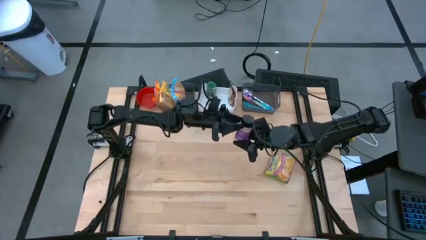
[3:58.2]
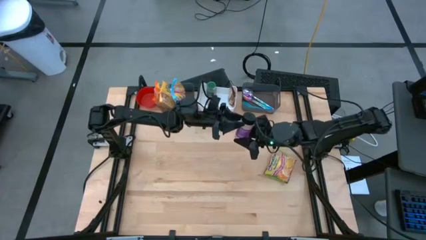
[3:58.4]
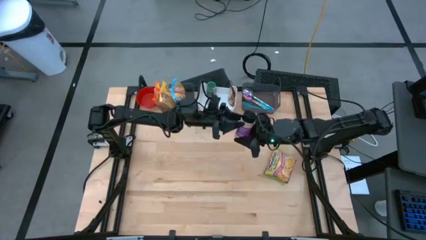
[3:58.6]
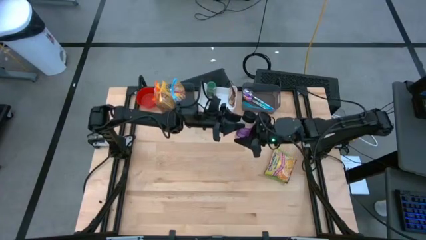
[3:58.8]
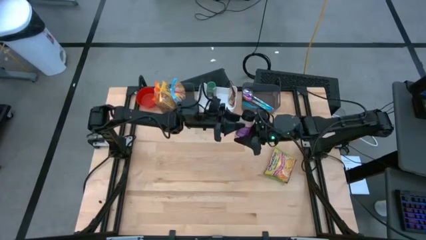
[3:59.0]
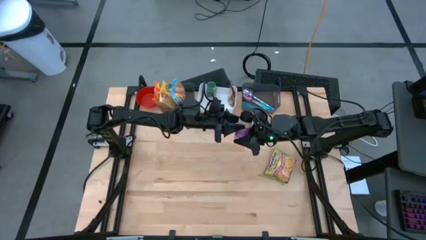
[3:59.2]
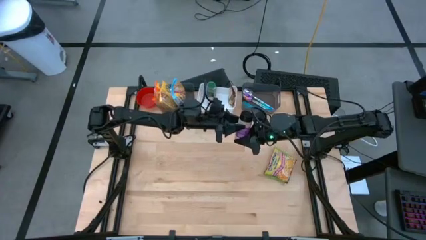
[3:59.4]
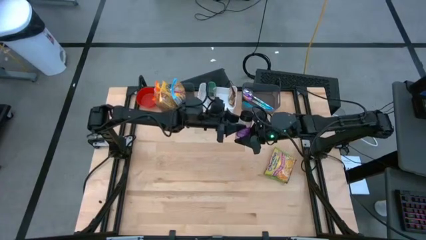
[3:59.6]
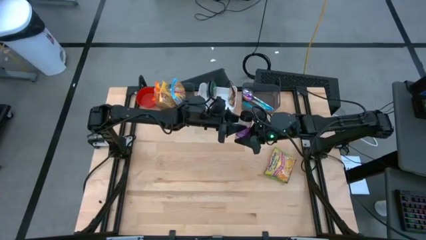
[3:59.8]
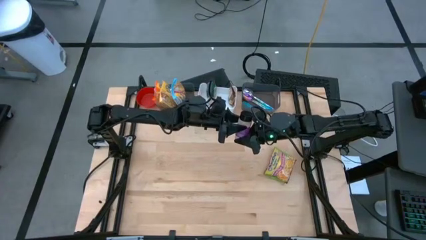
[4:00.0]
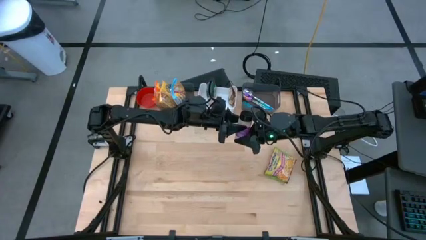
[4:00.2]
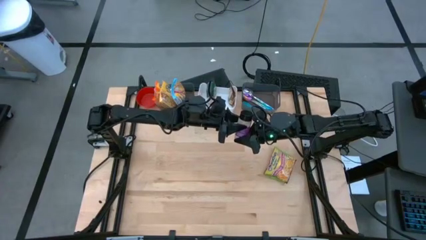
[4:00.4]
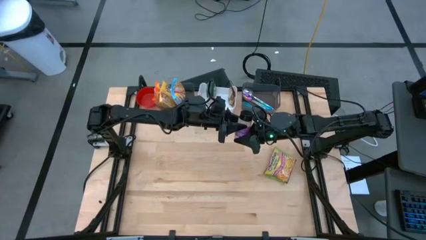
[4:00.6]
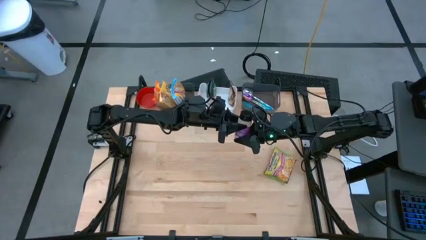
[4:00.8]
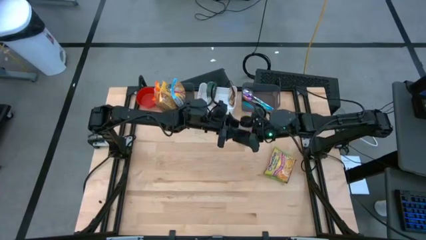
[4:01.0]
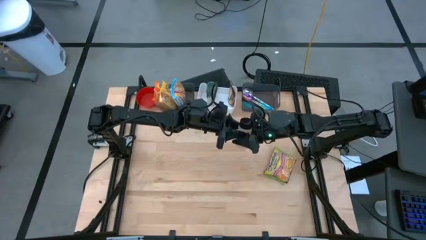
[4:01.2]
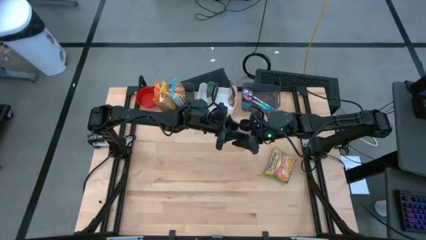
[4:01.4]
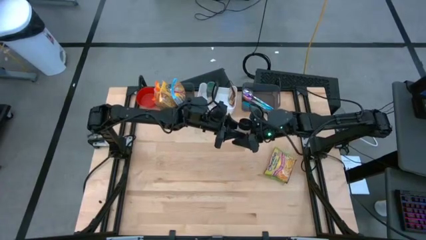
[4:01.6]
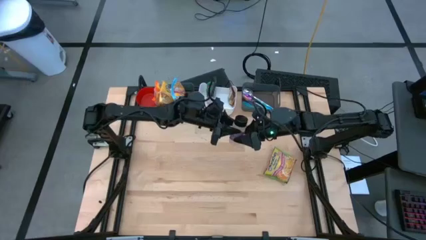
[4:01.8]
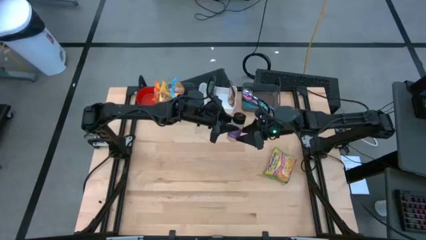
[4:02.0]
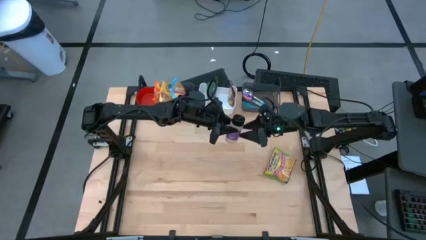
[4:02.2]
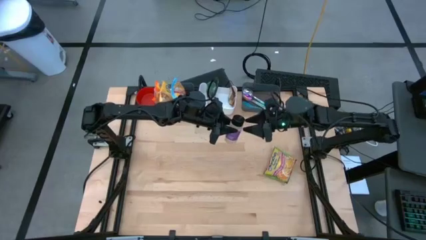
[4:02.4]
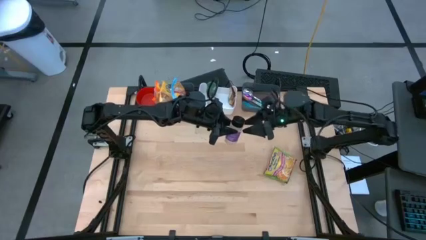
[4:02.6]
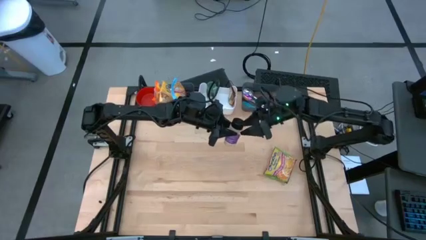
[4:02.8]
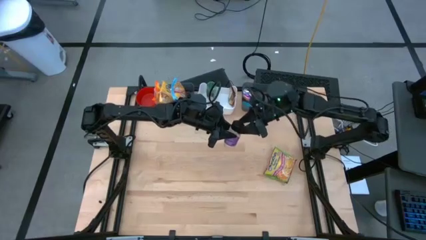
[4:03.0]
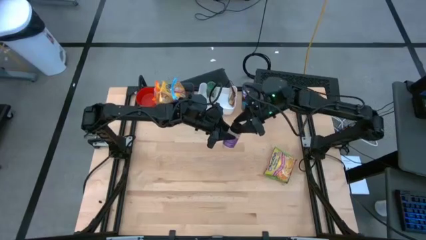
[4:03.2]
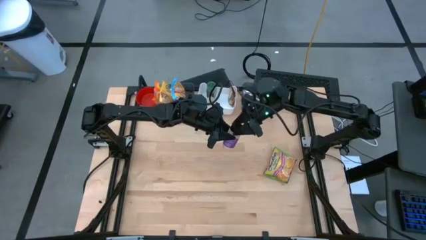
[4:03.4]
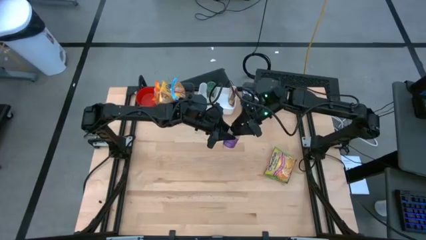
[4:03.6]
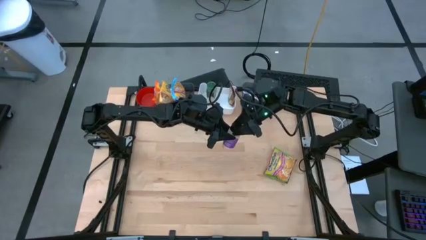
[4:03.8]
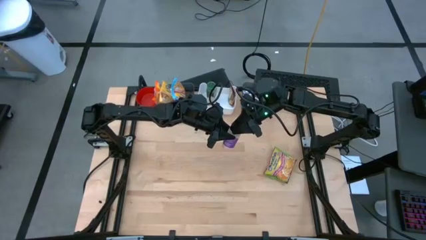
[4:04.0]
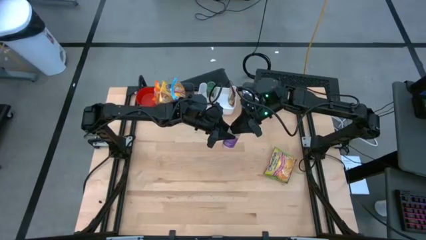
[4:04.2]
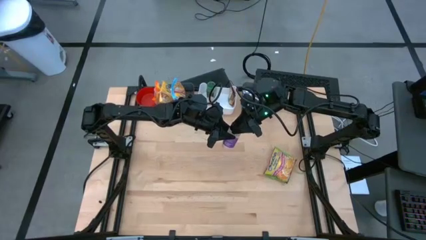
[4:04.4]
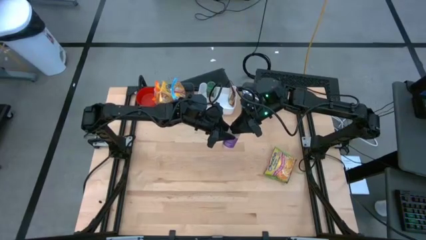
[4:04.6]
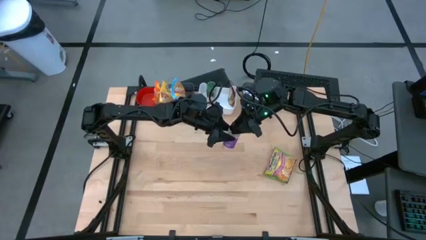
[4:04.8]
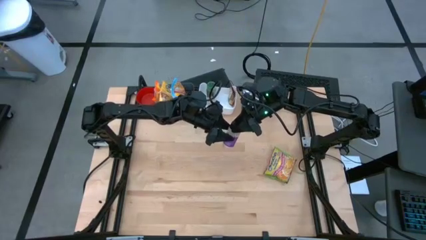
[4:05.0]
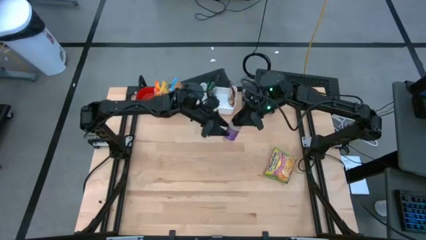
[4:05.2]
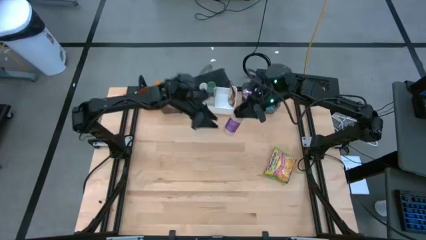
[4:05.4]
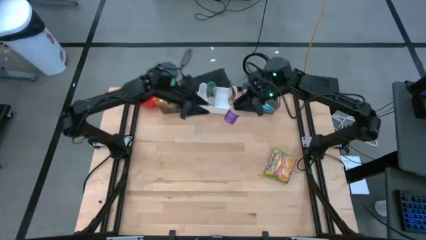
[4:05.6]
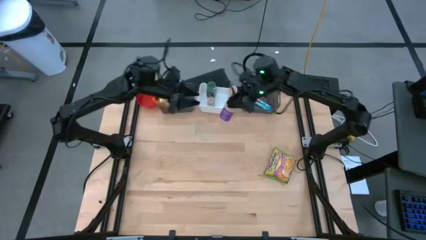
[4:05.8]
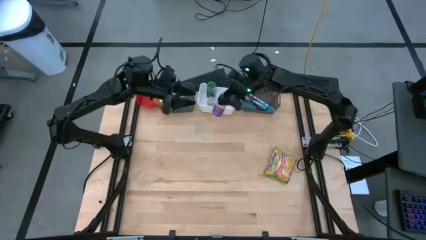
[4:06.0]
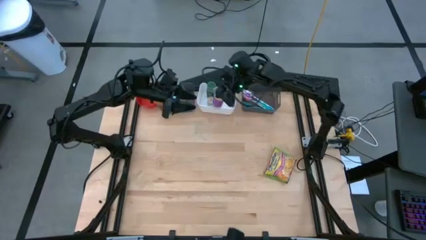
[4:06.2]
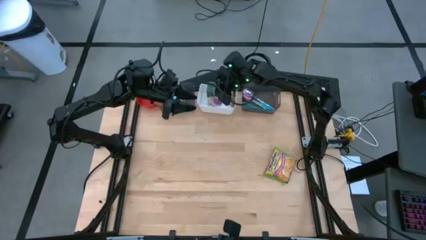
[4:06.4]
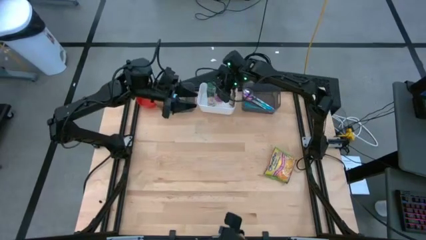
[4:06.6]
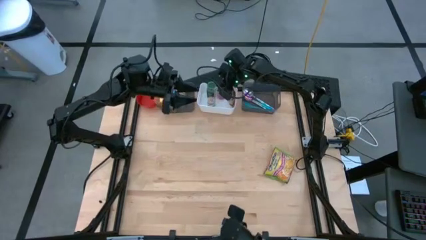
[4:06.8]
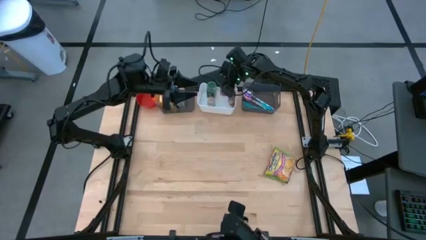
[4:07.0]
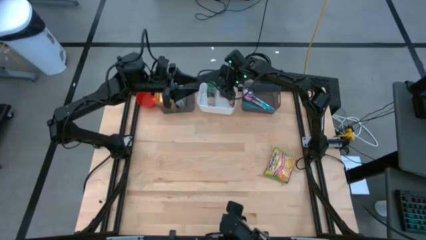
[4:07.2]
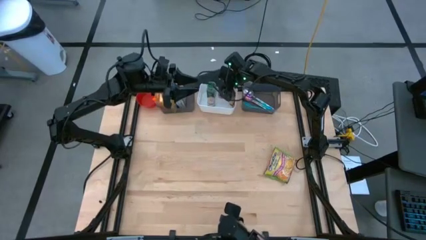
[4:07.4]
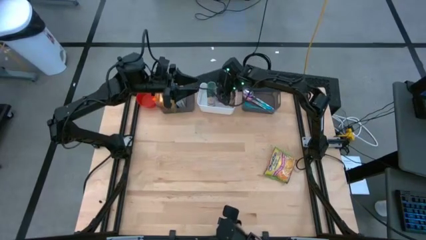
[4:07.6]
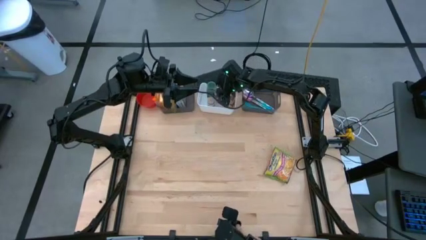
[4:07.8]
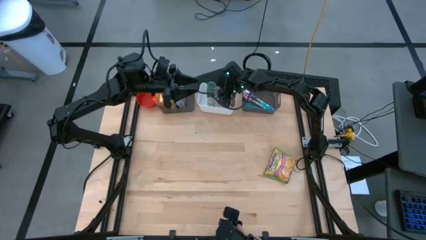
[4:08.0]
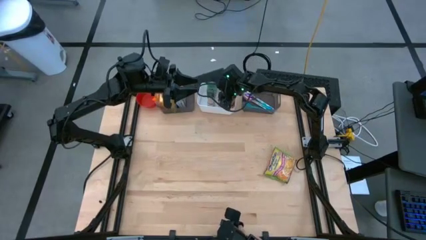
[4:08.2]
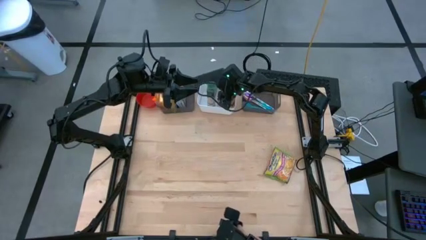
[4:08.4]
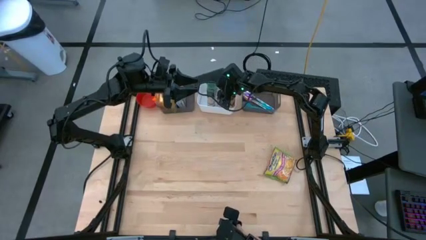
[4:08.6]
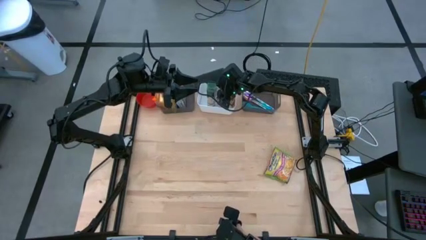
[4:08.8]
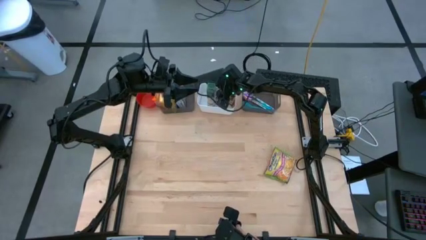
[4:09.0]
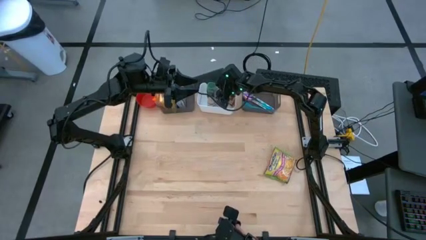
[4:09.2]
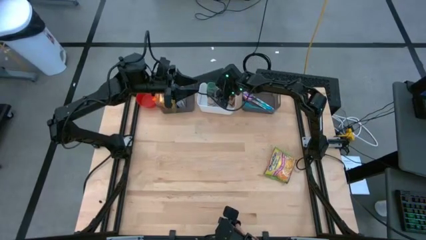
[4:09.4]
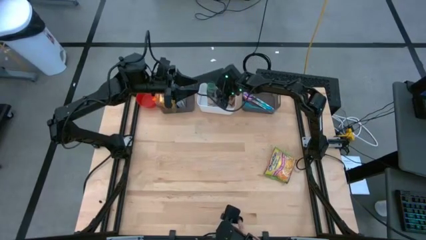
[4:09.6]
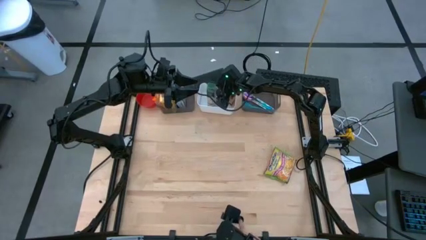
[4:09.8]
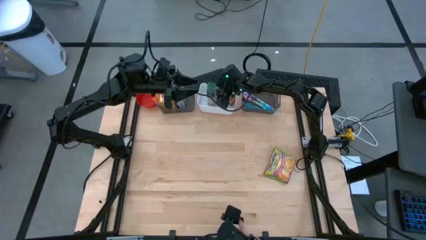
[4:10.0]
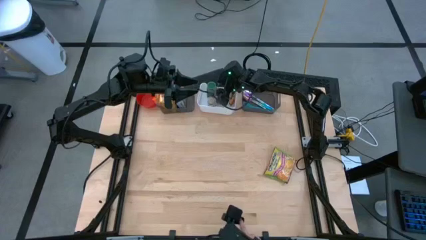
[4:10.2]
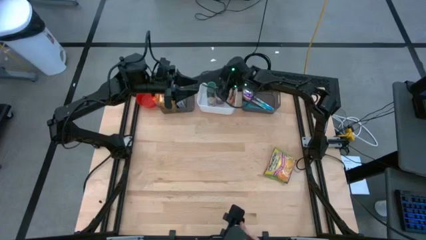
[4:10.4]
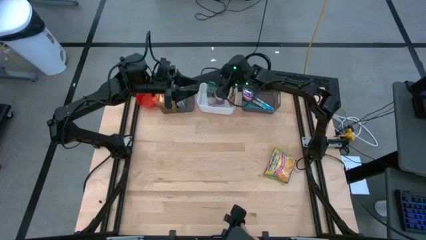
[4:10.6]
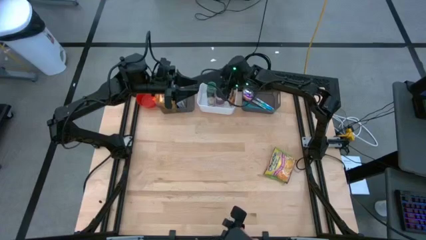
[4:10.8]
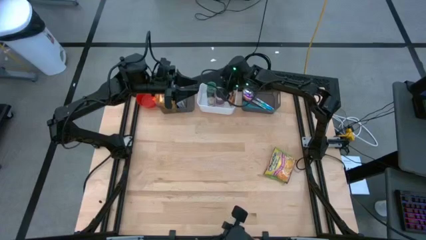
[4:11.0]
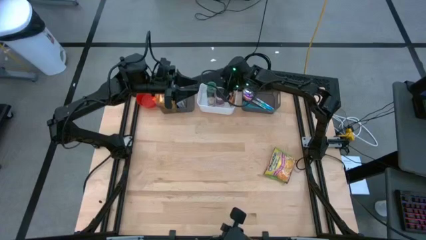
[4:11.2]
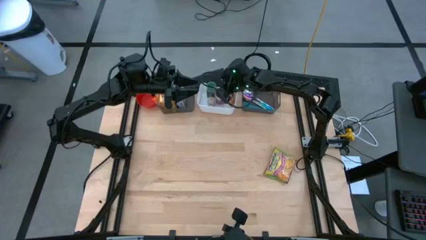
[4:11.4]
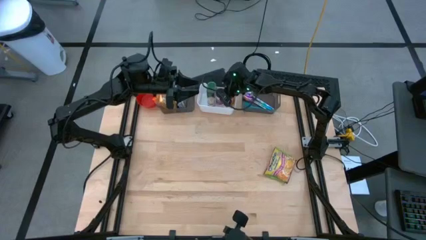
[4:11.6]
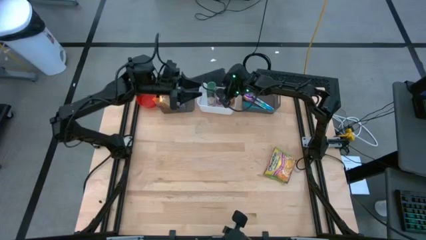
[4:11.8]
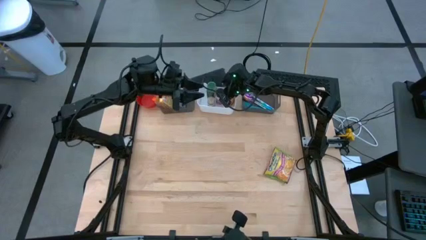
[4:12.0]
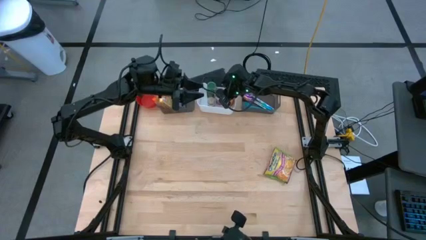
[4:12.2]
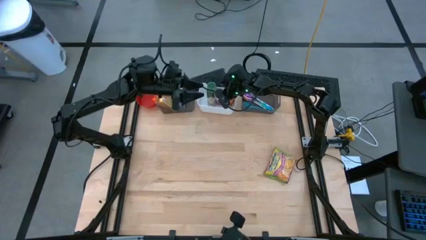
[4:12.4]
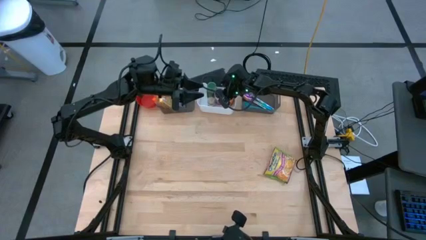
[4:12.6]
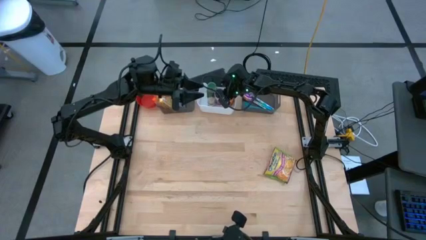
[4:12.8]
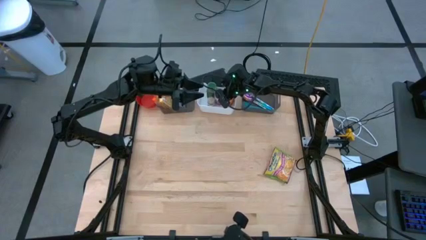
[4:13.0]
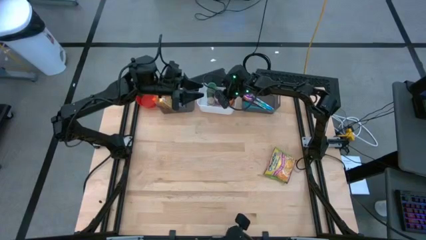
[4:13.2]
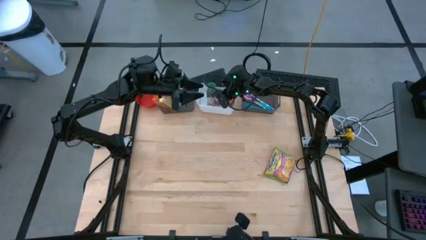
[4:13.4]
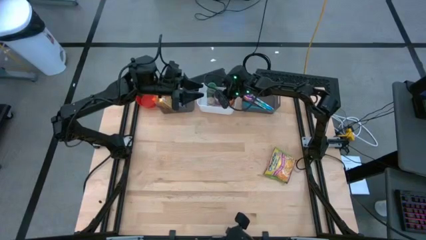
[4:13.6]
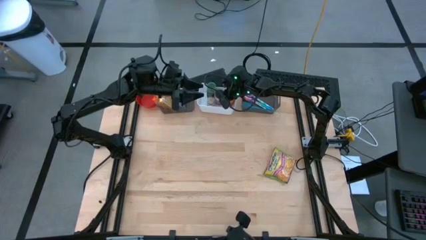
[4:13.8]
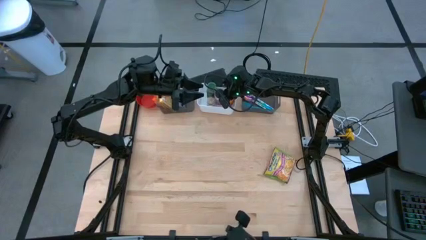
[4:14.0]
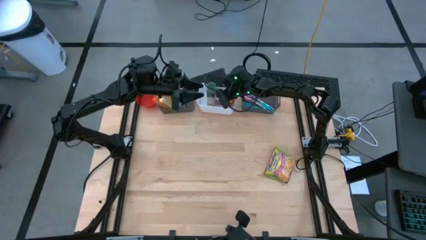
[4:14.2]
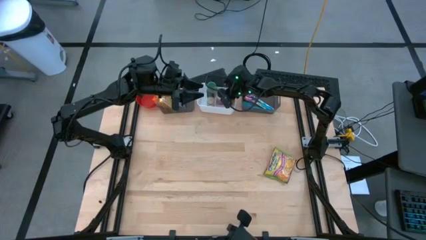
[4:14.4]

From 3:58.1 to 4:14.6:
Task: Pick & Place Food Item
Put the purple seasoning bottle into the white bin
